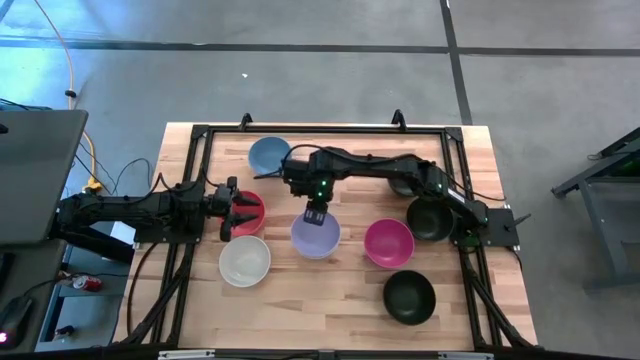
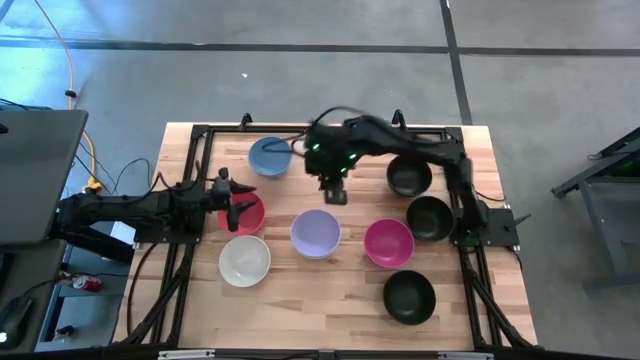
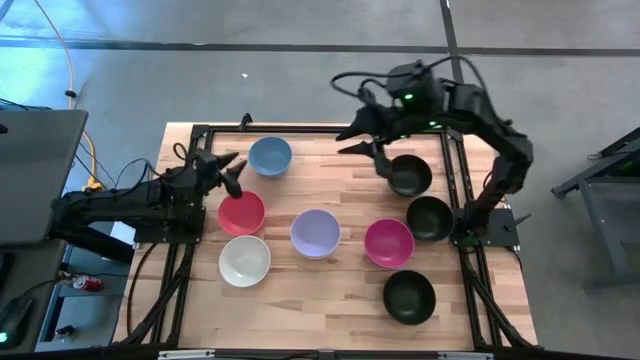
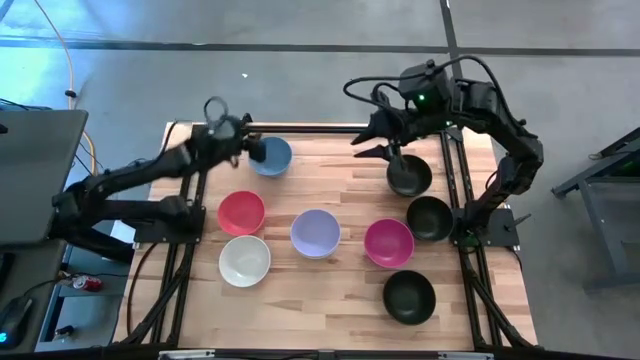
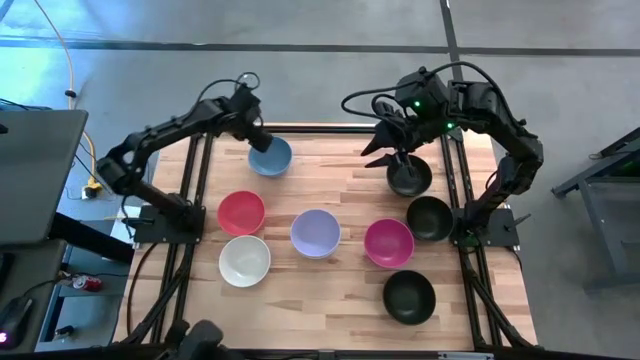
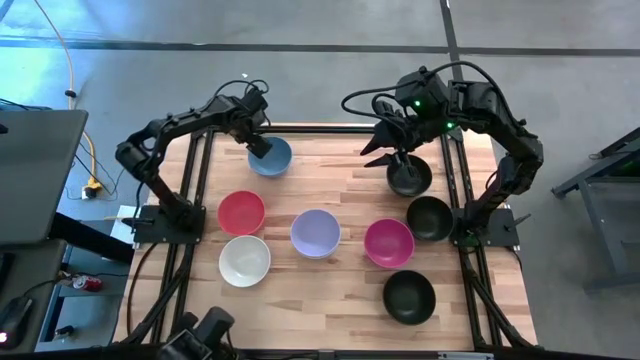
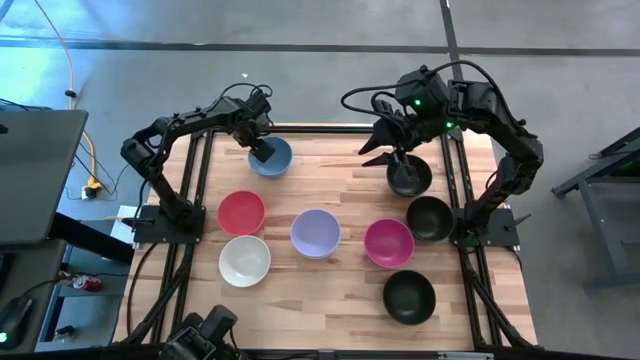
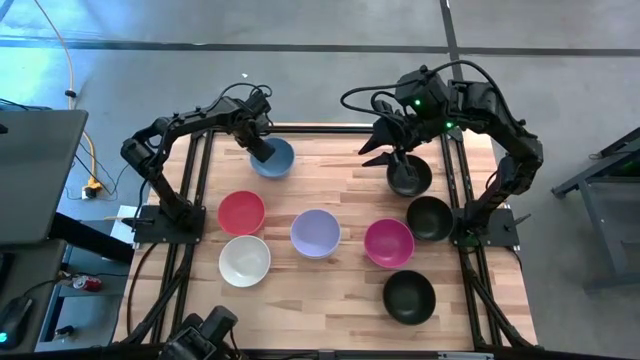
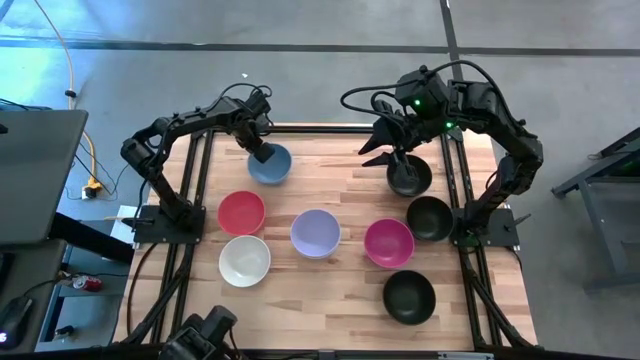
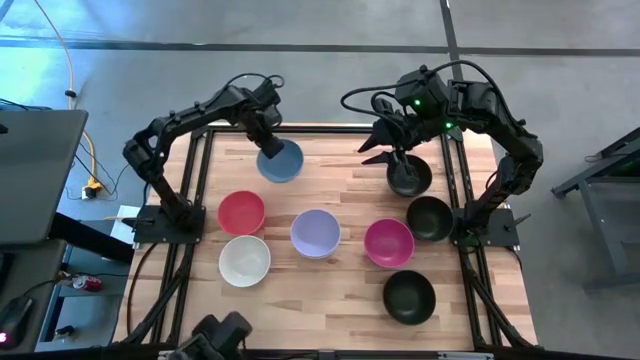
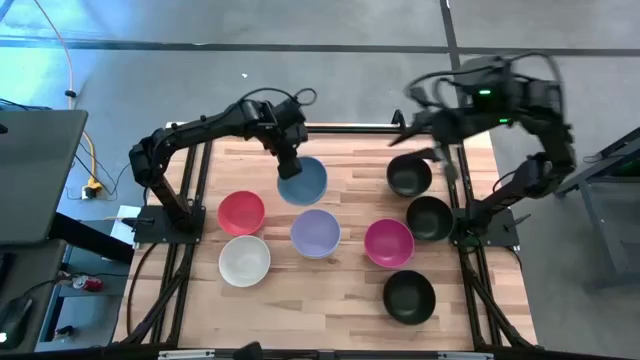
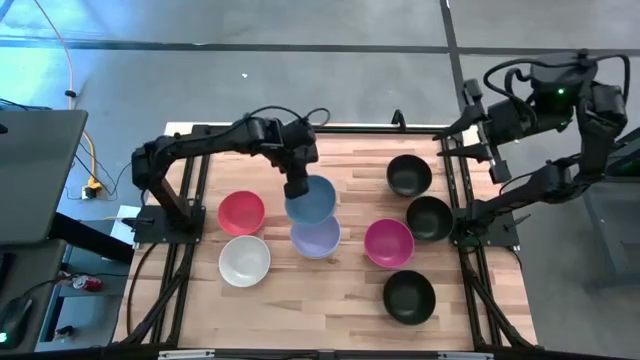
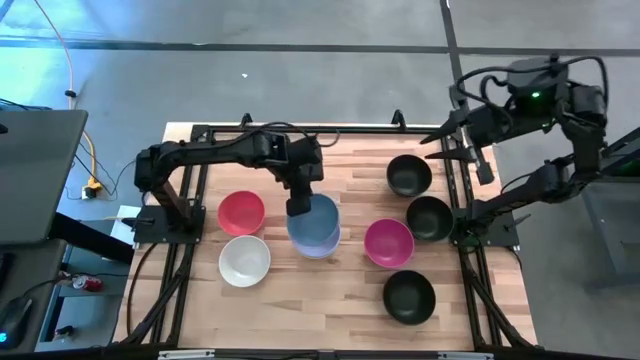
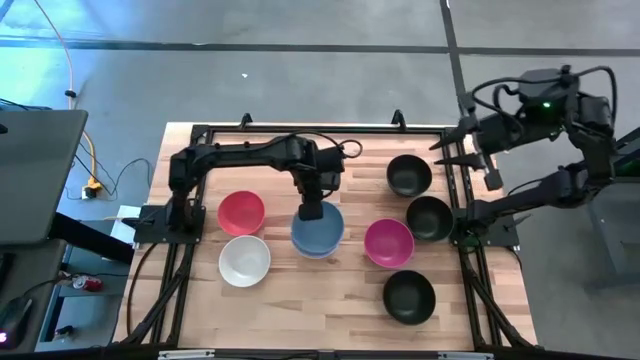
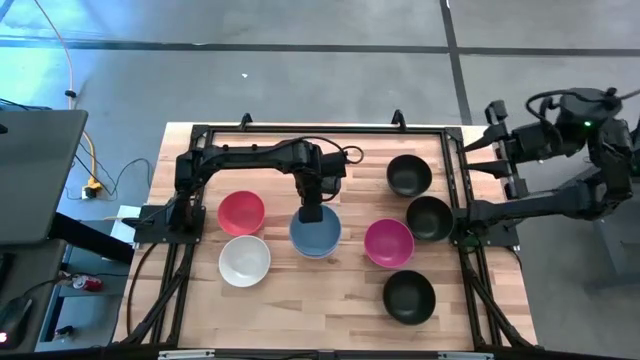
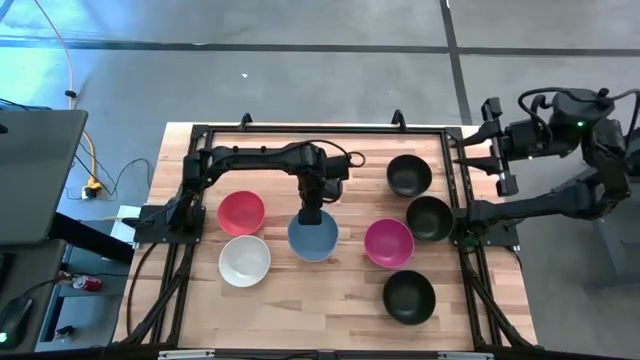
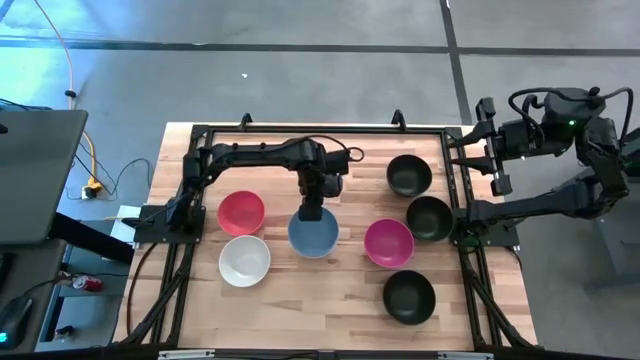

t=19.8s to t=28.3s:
Task: Nest bowls inside each other
Stack the blue bowl on top of the purple bowl

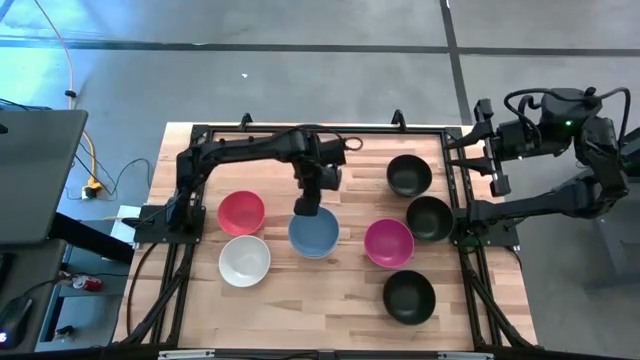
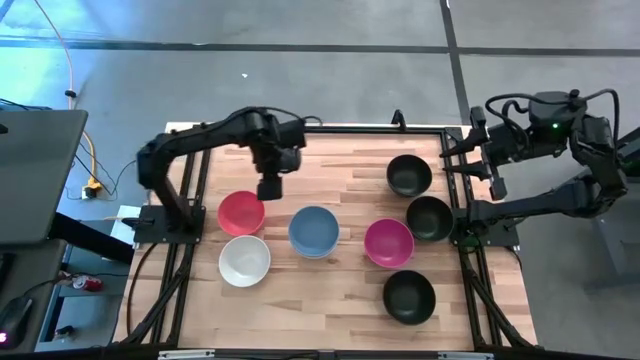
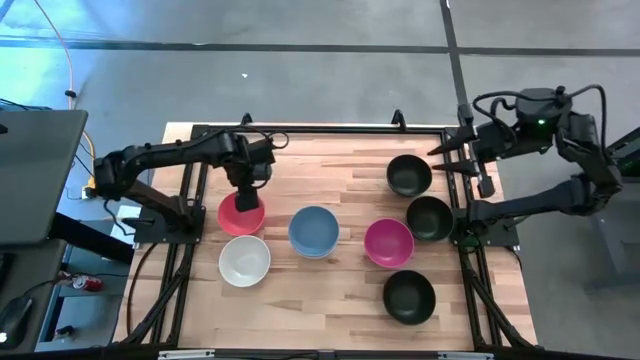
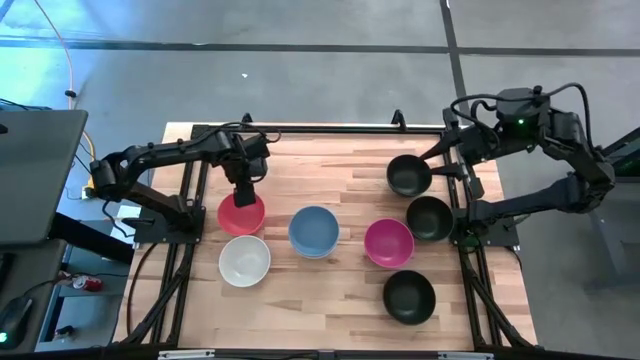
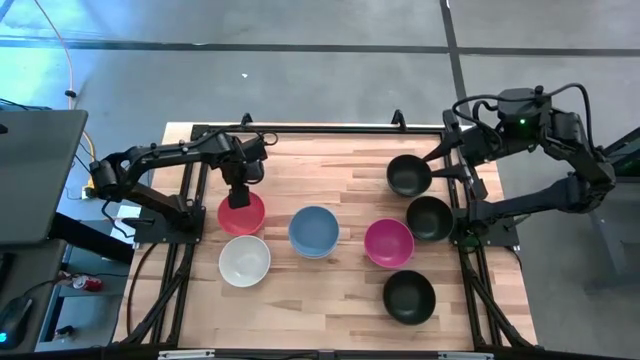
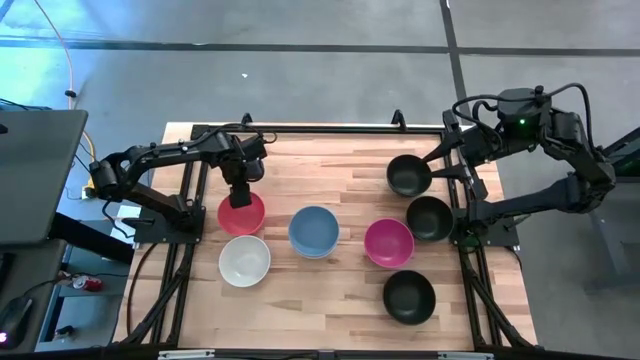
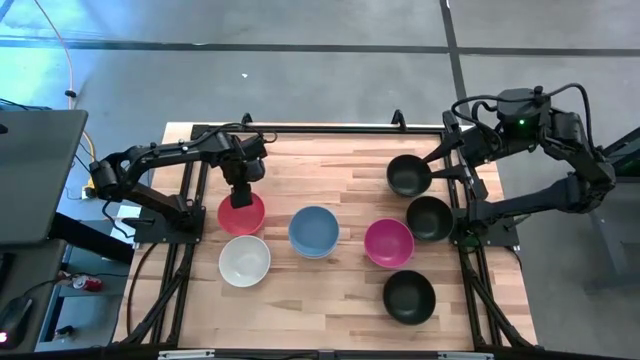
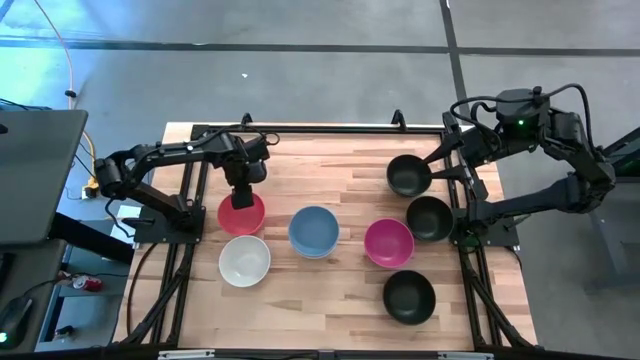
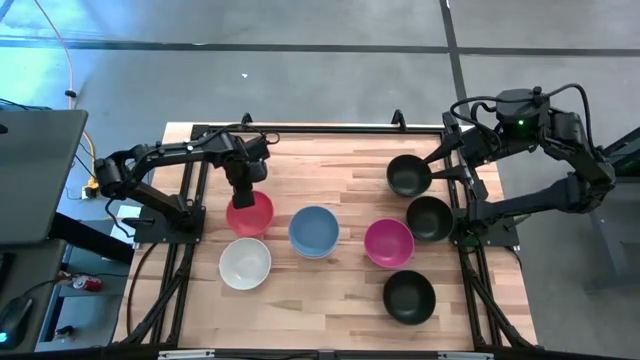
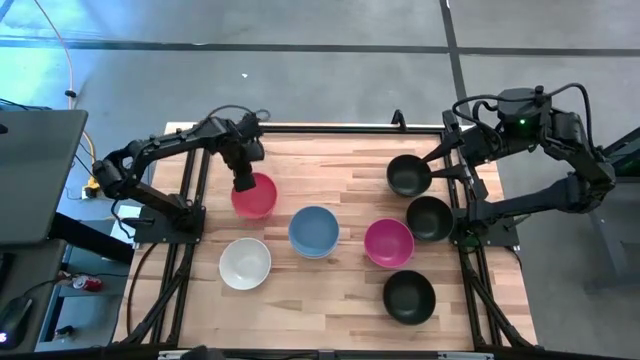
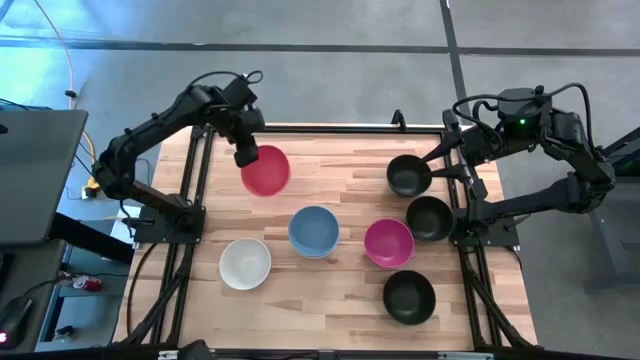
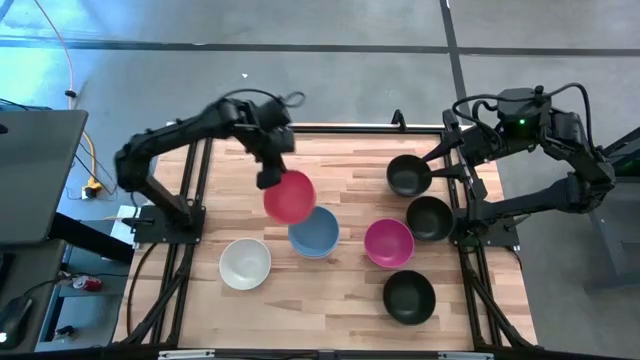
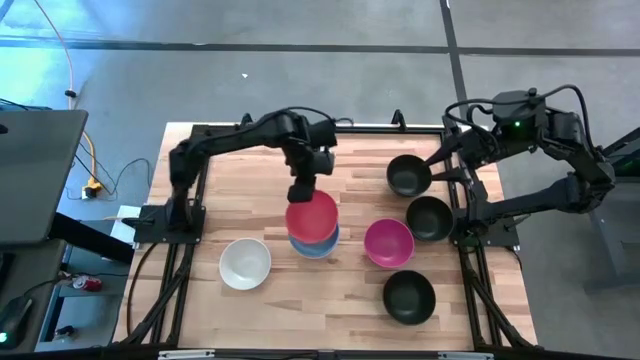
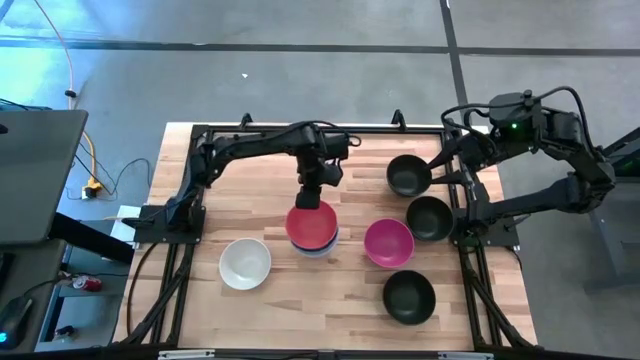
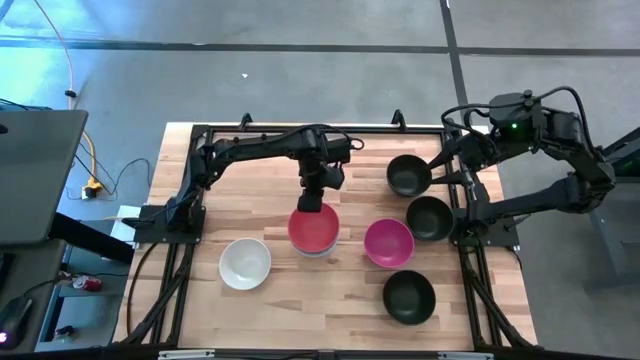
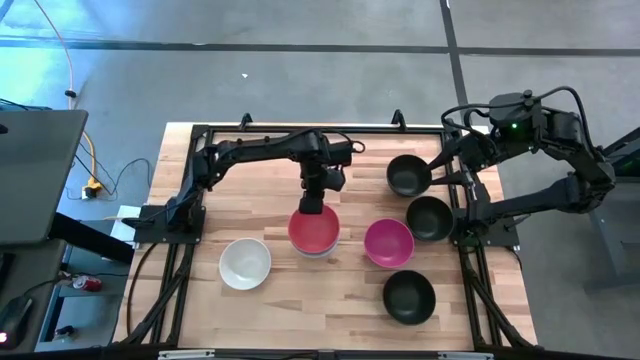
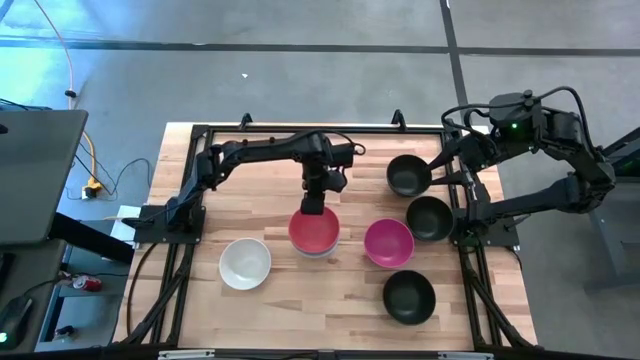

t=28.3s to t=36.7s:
Stack the red bowl on top of the blue bowl

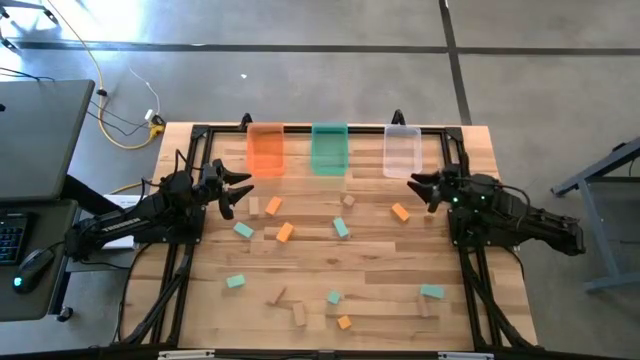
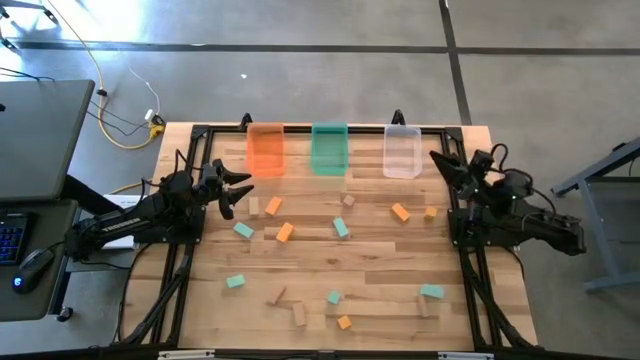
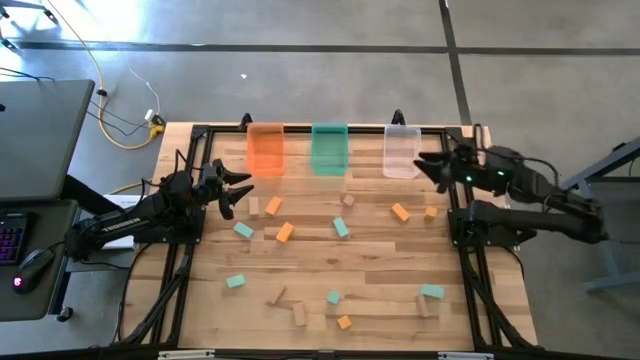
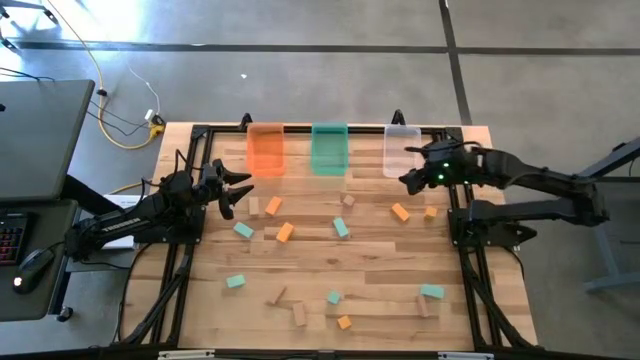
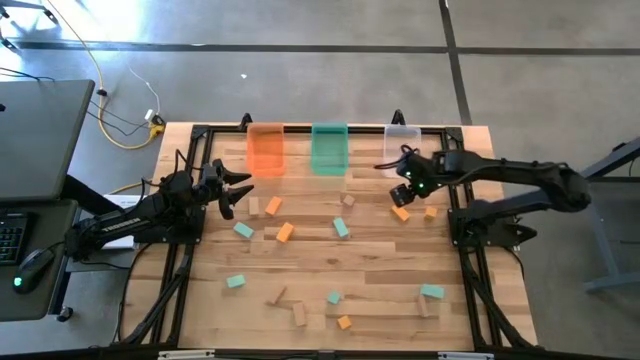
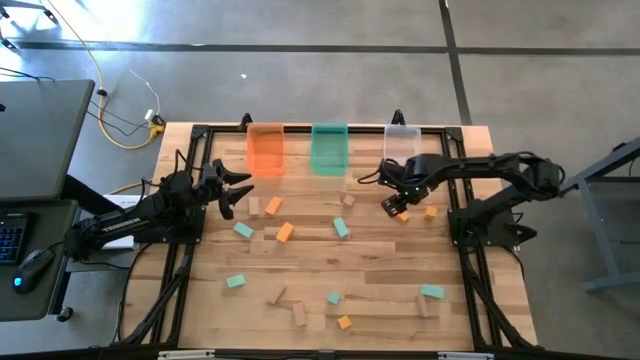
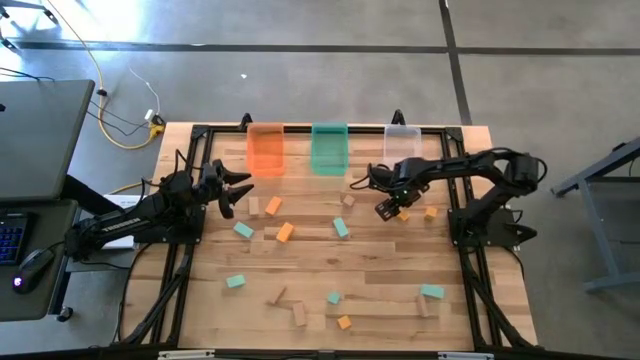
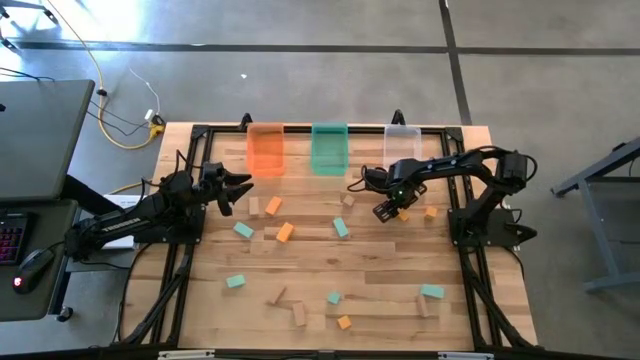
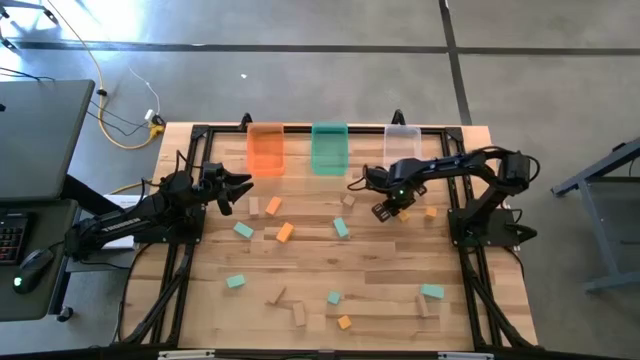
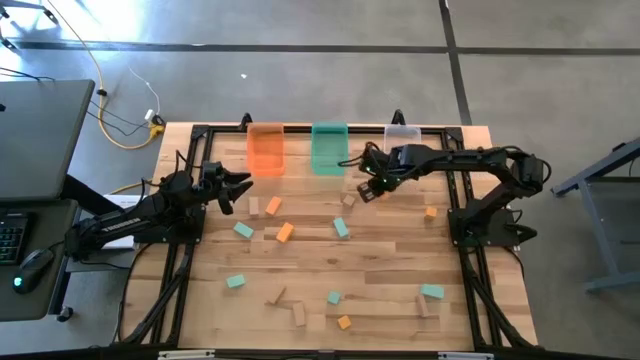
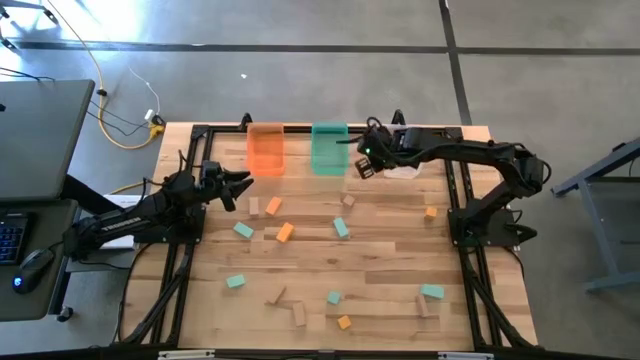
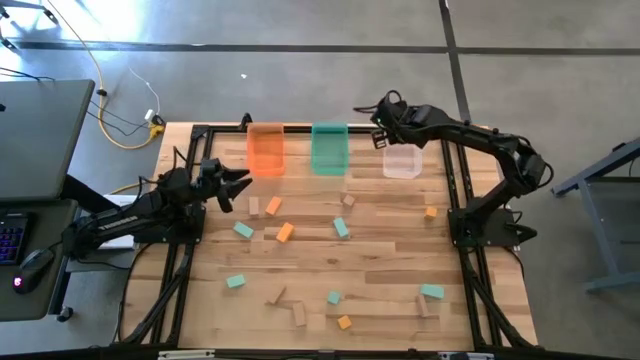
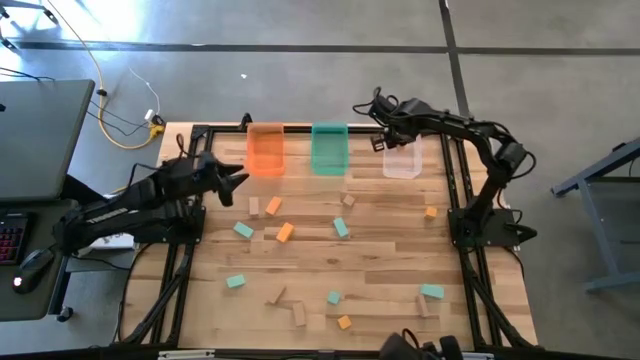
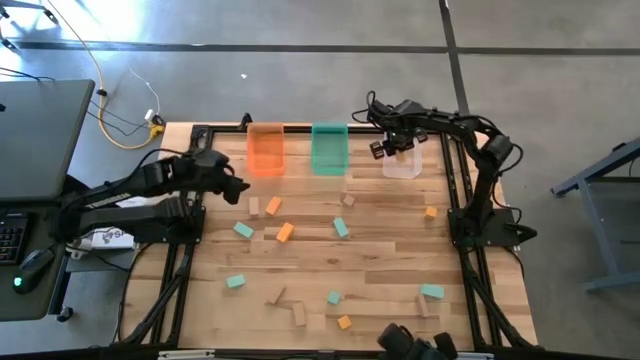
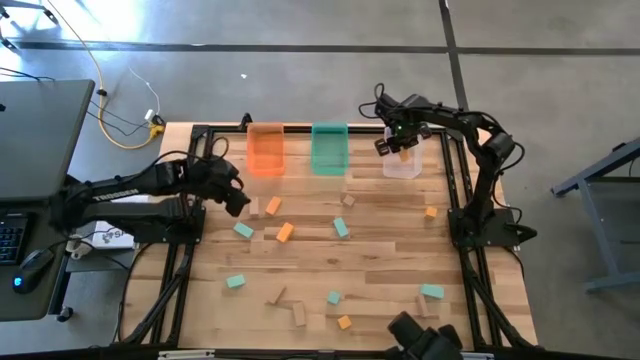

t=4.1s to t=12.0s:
Task: Sort & place blocks by color
Put the yellow block into the transparent bin
